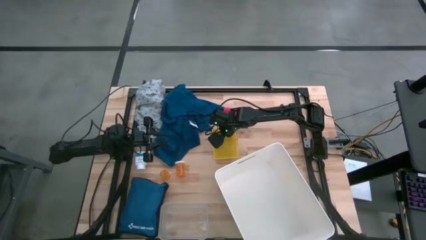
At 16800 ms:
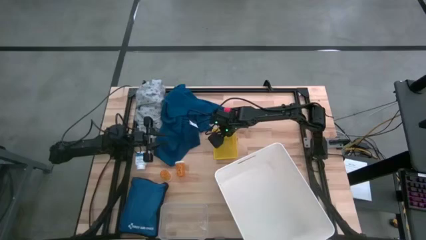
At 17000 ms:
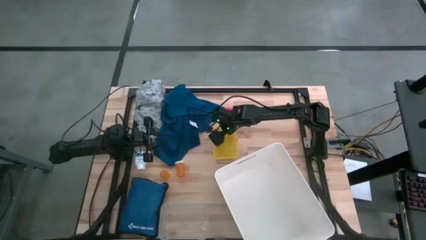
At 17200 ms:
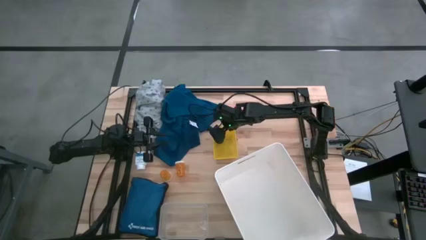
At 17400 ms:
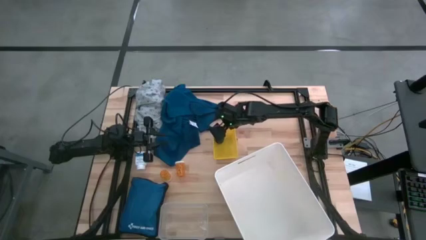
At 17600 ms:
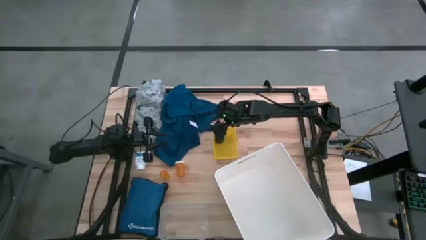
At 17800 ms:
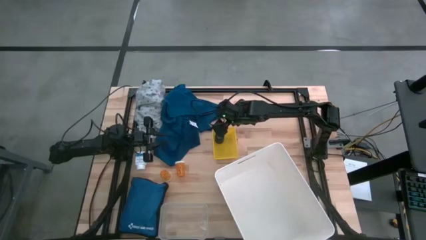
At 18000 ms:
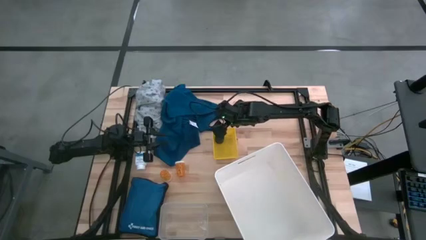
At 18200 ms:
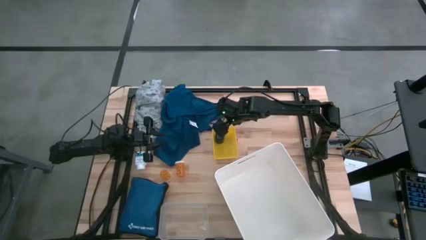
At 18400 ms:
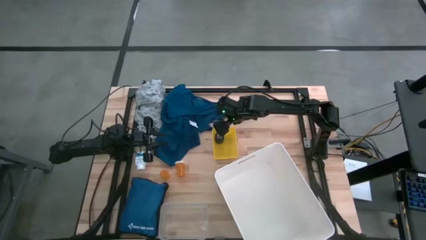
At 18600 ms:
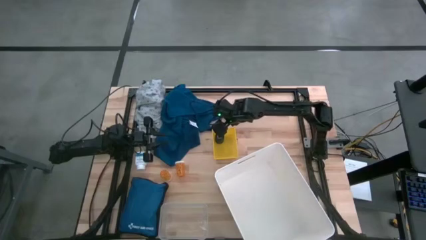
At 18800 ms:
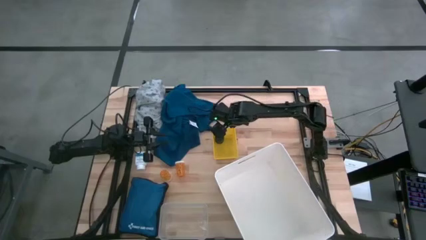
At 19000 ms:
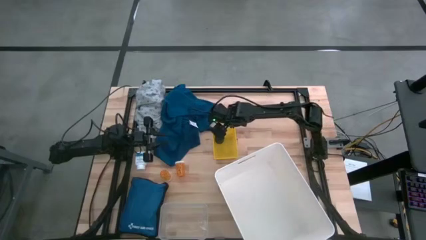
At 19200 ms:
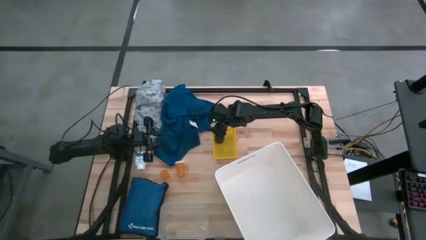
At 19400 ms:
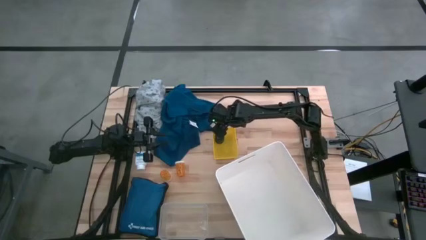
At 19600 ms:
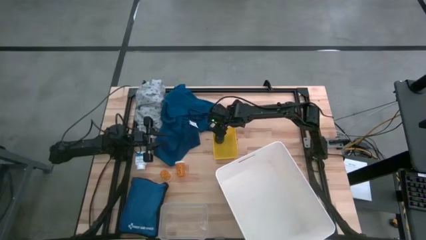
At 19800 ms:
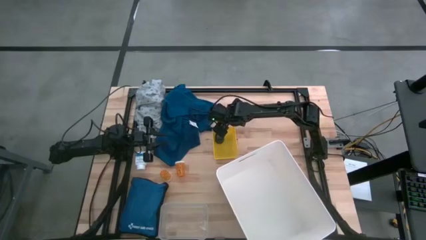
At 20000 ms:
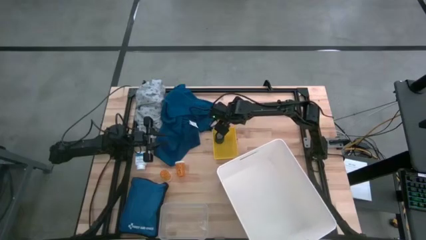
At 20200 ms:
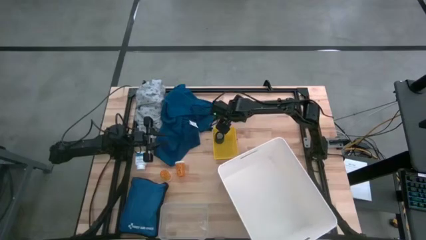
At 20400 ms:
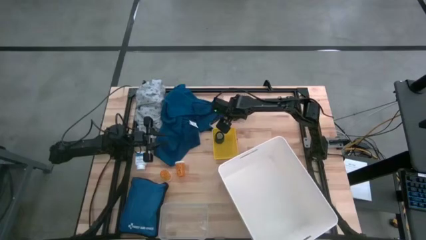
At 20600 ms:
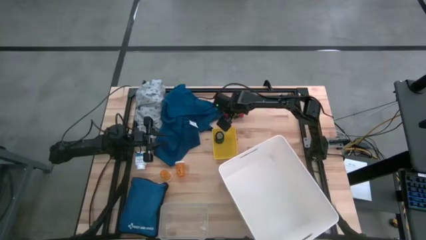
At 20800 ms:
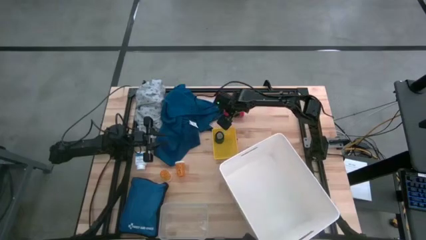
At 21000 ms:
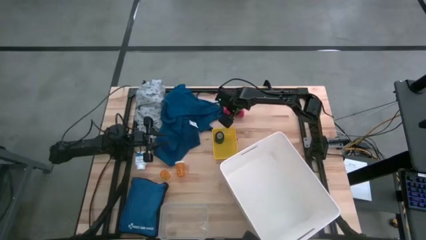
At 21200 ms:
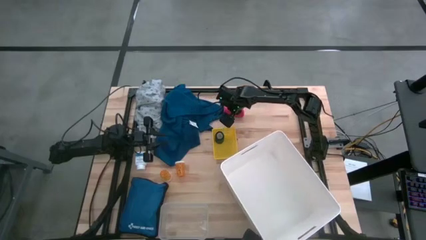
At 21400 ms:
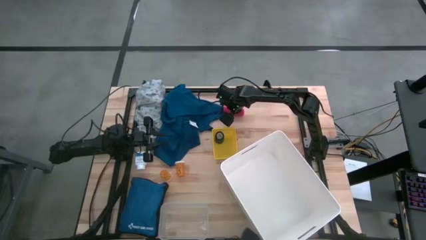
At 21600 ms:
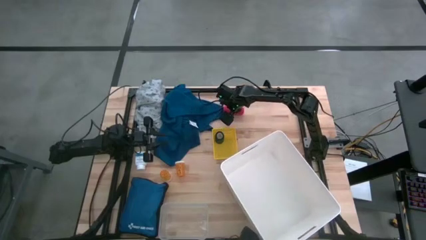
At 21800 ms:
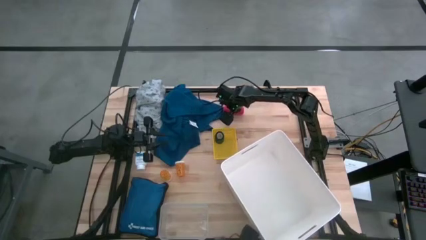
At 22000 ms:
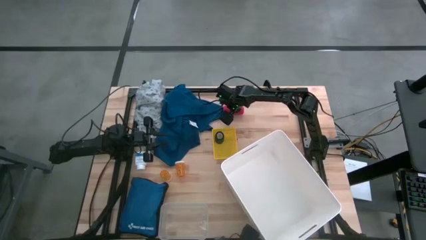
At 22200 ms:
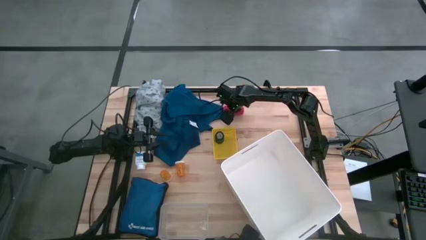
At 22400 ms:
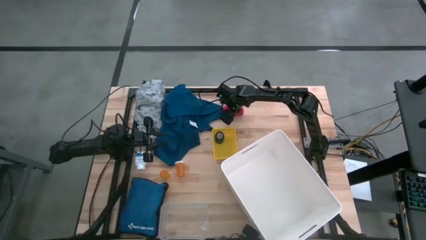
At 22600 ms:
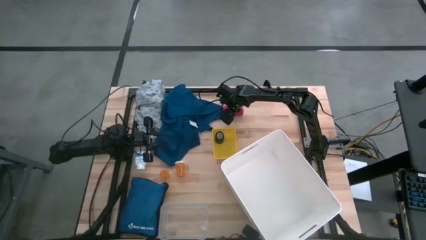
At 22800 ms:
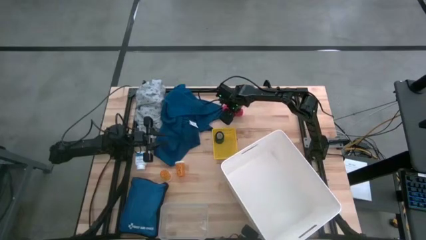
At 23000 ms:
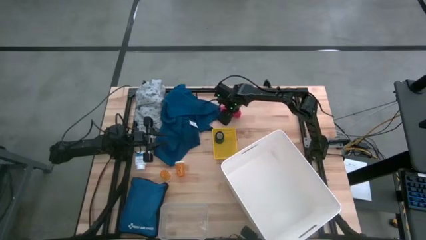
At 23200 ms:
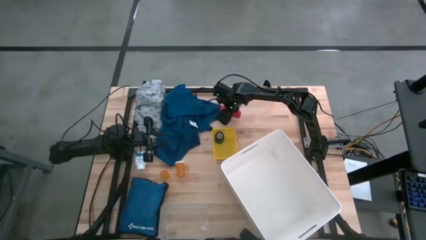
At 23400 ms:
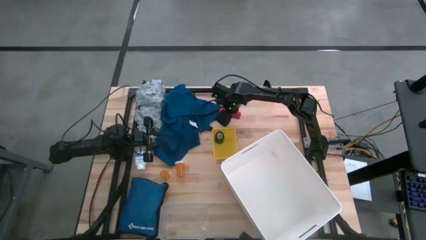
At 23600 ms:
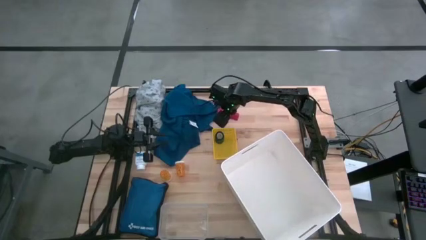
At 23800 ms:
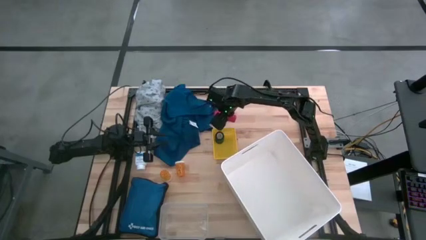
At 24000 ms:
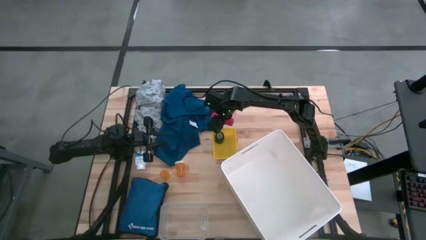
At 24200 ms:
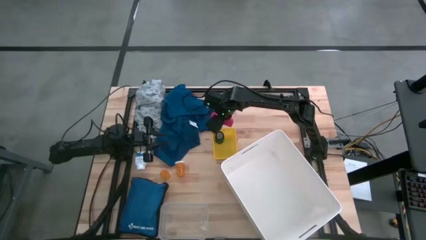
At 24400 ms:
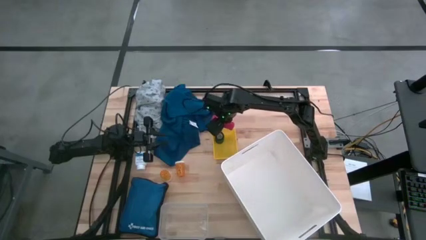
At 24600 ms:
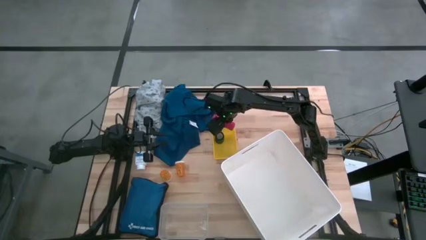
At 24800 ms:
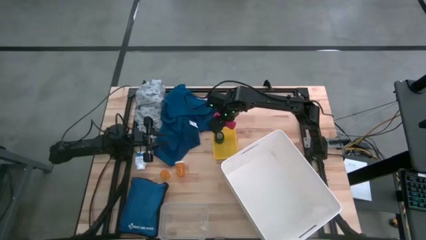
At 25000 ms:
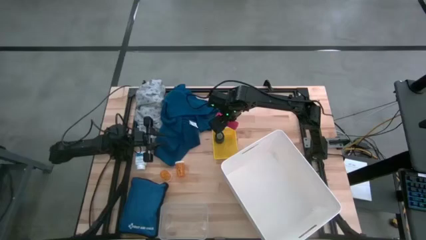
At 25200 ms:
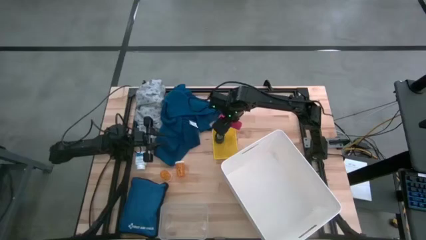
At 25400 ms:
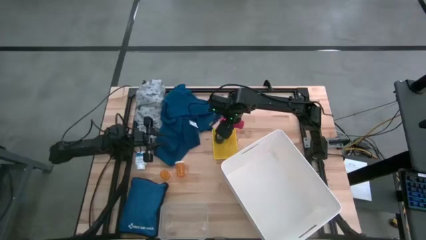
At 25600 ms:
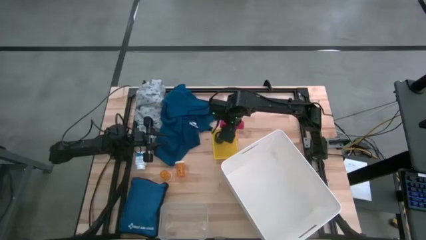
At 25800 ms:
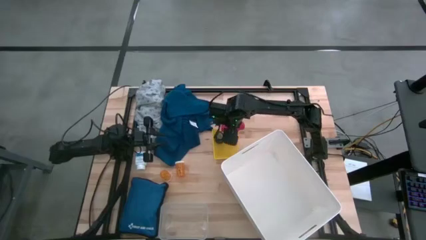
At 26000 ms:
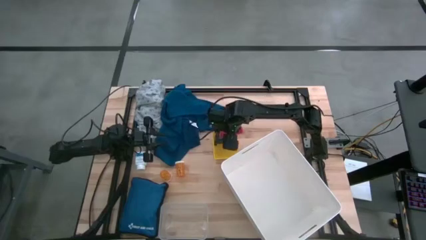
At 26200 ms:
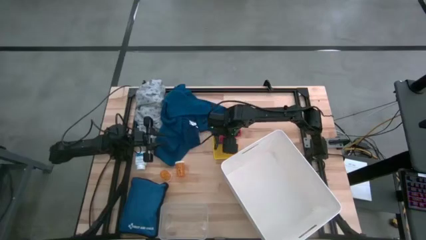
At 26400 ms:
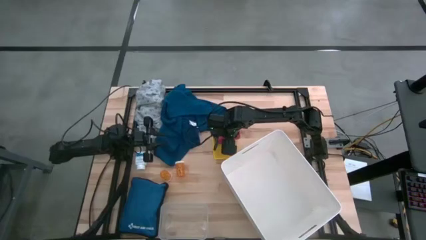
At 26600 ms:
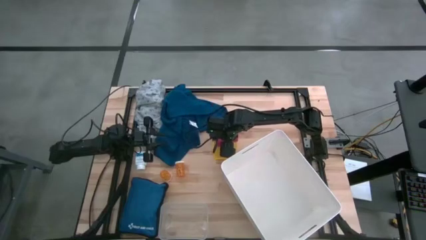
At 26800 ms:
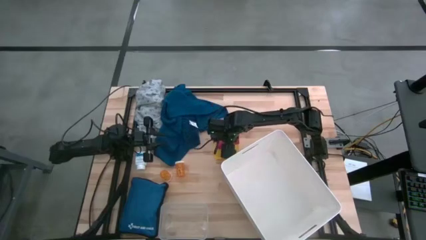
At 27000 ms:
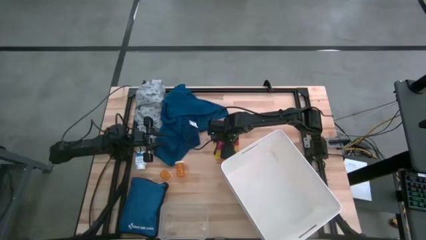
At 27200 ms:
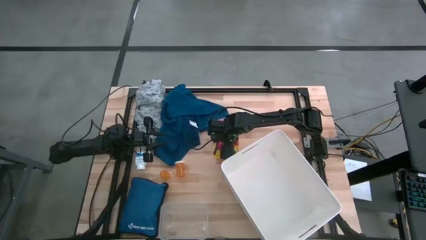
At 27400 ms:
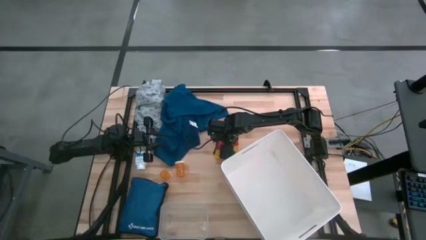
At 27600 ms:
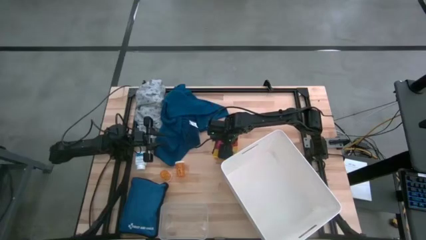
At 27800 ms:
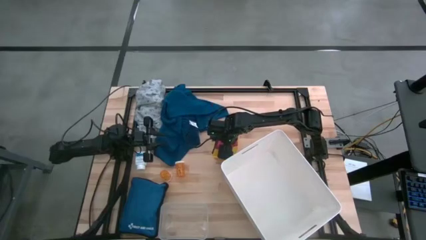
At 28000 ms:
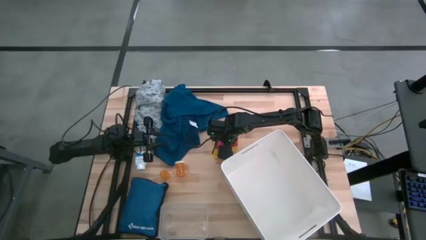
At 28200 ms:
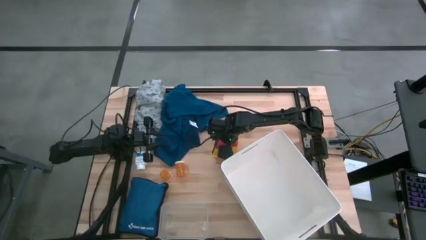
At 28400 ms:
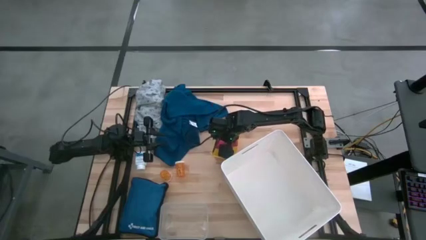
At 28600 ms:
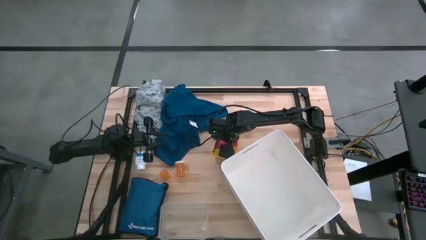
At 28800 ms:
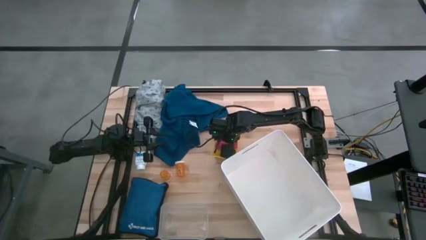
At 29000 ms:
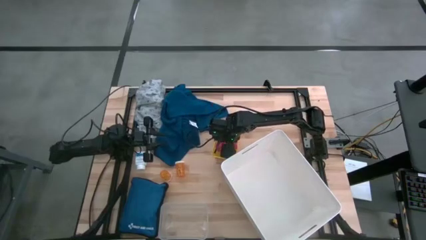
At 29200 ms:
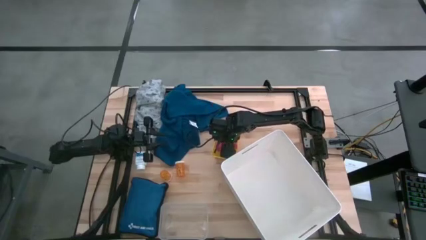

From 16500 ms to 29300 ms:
Task: Pick & place medical supplies in basket/bin
Put the red bandage into the yellow bin

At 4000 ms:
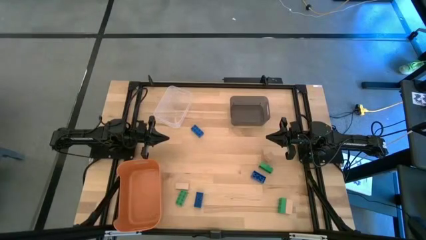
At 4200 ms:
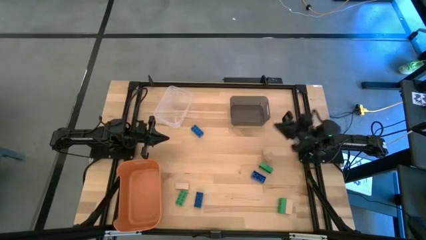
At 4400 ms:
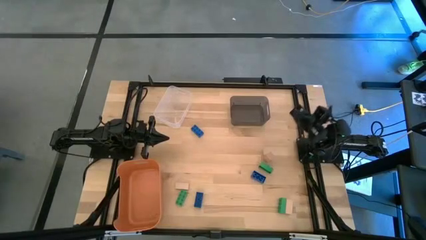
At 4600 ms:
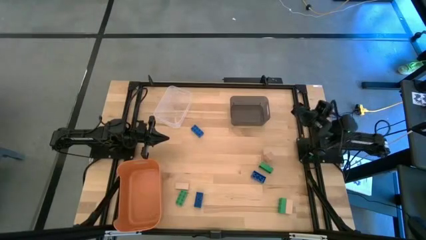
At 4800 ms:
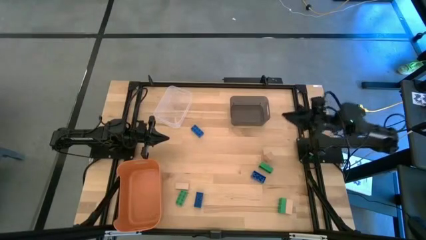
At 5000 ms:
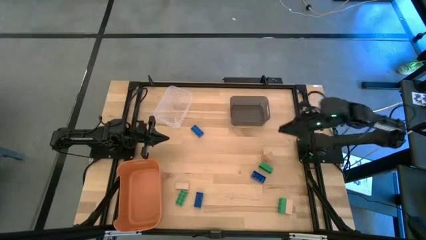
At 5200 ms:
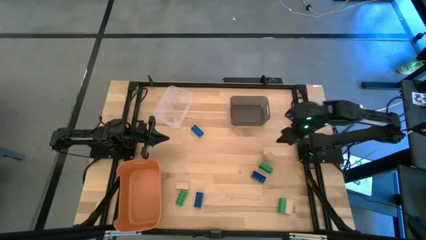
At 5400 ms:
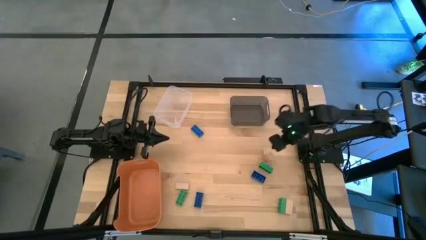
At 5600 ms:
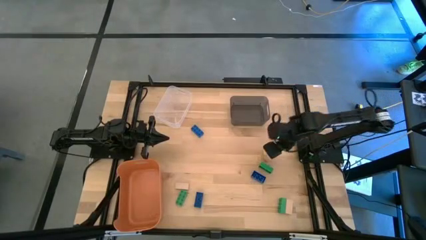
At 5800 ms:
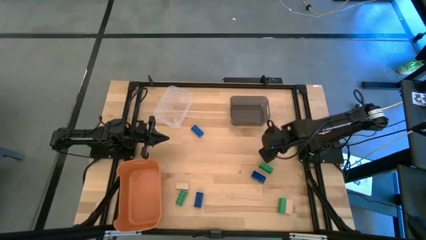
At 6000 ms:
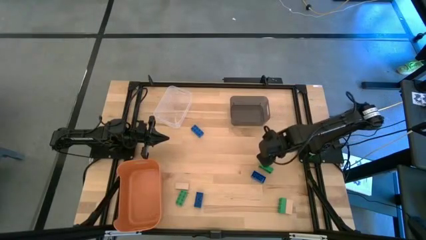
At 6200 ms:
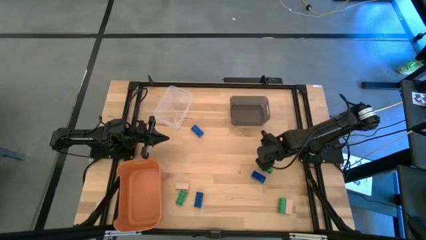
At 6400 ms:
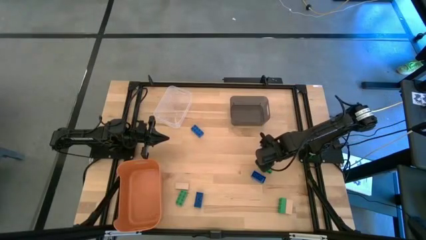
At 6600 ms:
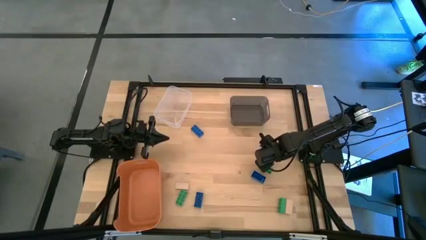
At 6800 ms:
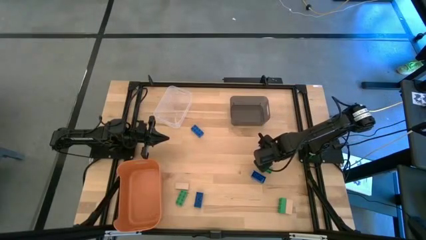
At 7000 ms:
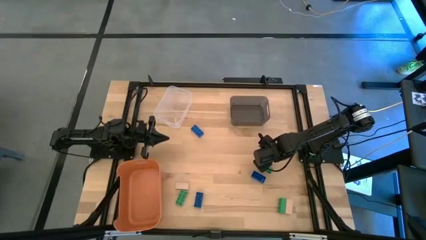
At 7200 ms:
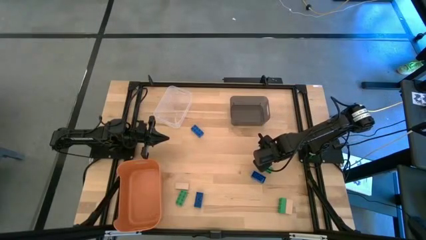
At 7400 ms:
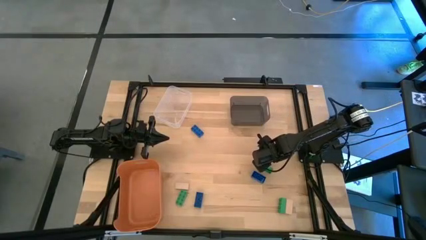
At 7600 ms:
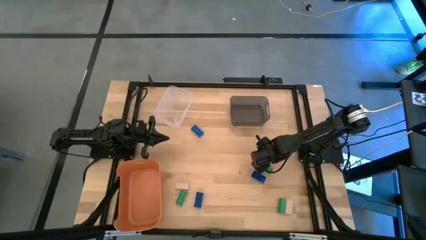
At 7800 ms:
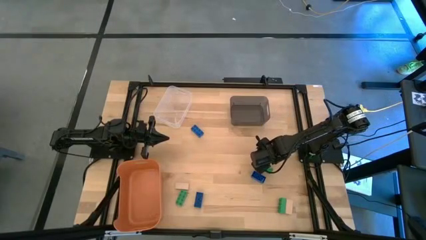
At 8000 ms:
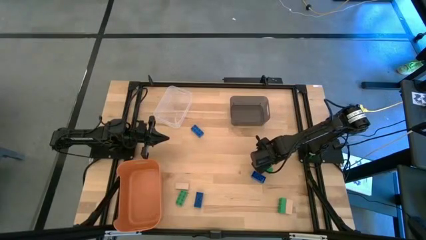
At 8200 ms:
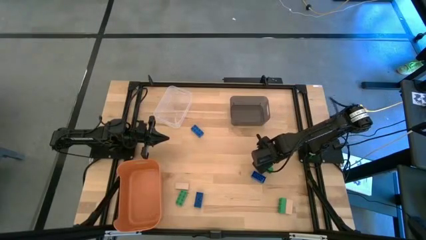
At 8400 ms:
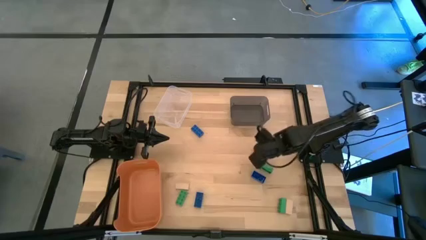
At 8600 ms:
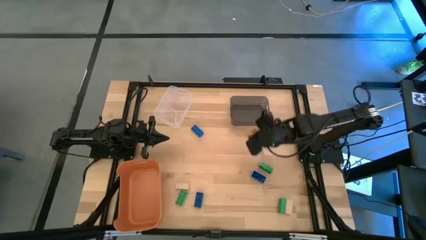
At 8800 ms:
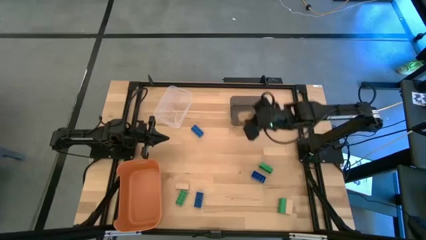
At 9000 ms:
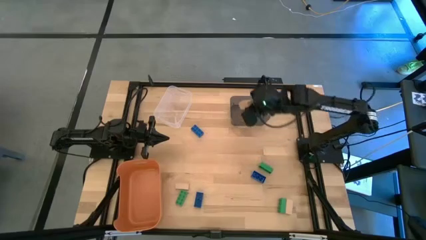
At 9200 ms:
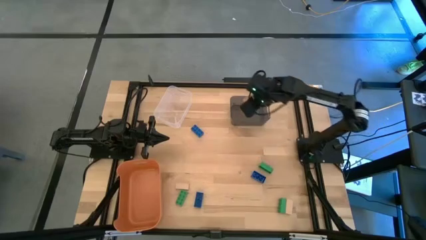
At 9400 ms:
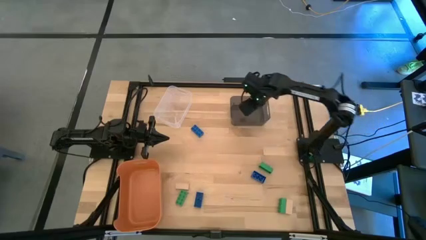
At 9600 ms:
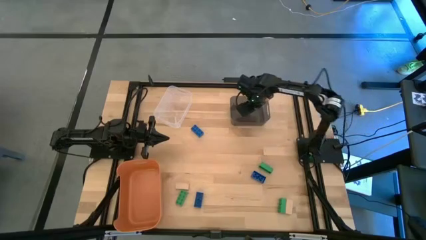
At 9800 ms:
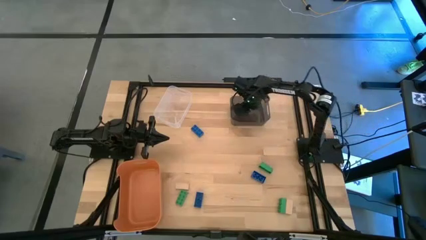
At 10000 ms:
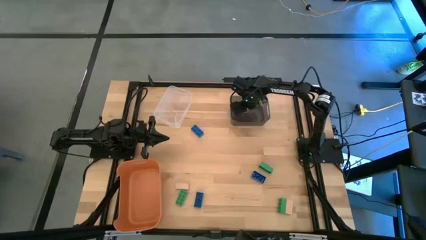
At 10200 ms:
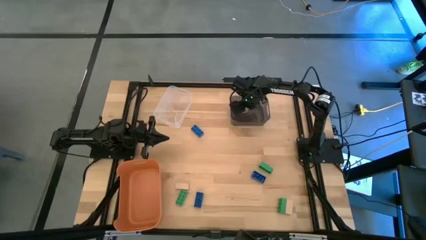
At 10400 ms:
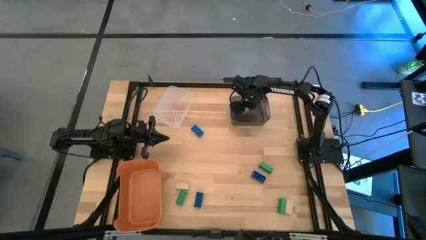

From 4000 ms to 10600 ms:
Task: Sort & place blocks by color
Put the top left brown block into the black bin
